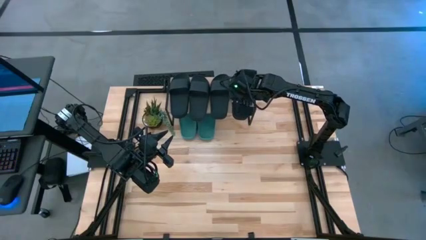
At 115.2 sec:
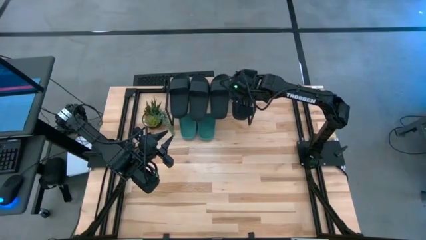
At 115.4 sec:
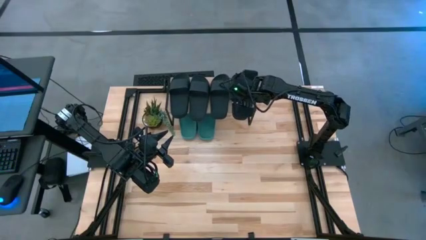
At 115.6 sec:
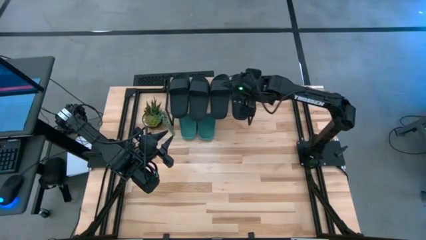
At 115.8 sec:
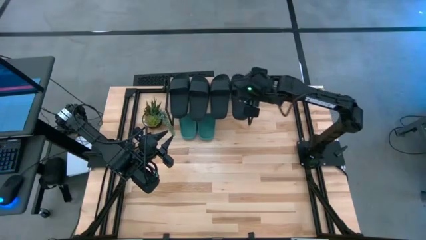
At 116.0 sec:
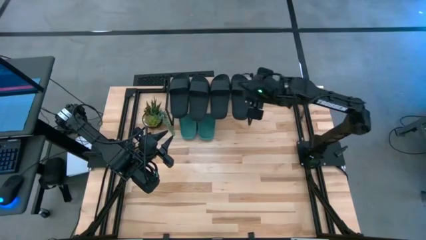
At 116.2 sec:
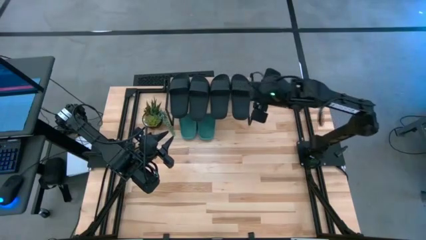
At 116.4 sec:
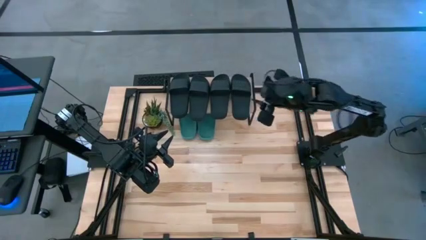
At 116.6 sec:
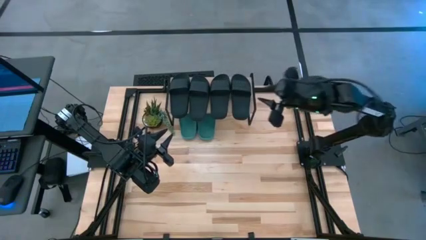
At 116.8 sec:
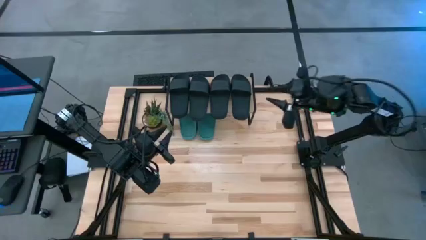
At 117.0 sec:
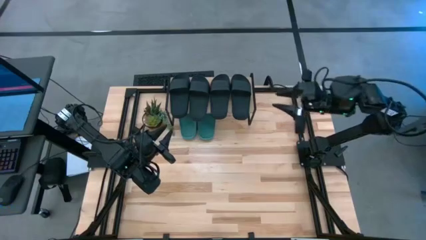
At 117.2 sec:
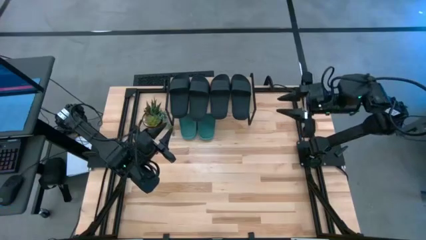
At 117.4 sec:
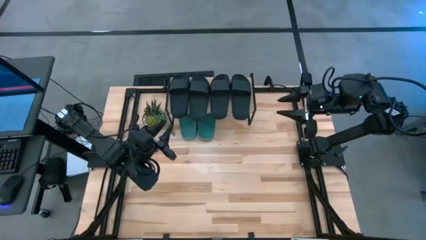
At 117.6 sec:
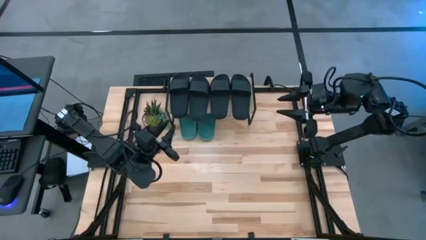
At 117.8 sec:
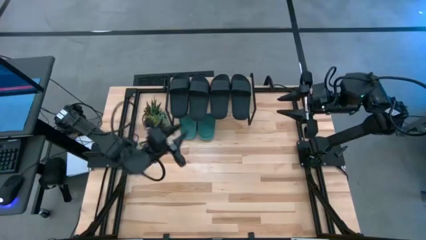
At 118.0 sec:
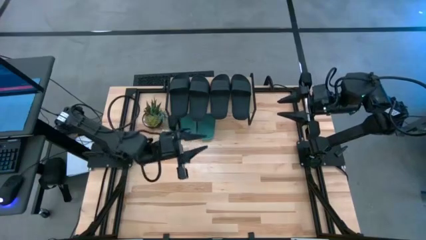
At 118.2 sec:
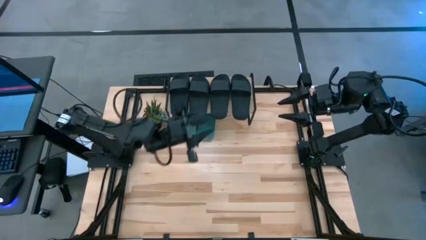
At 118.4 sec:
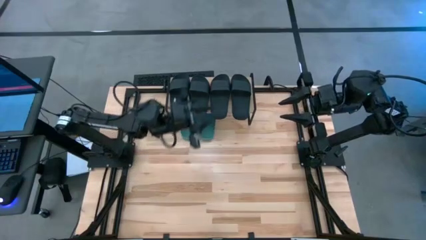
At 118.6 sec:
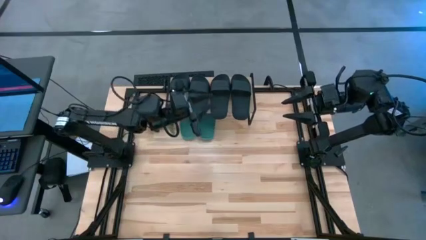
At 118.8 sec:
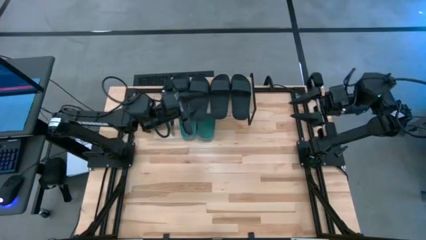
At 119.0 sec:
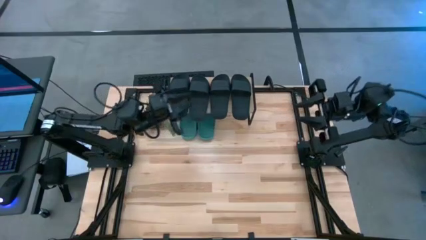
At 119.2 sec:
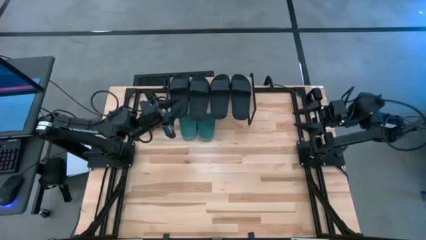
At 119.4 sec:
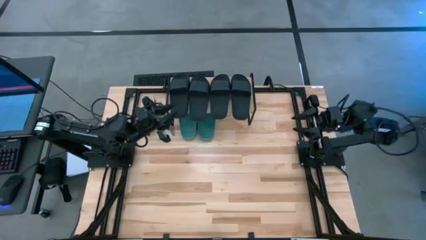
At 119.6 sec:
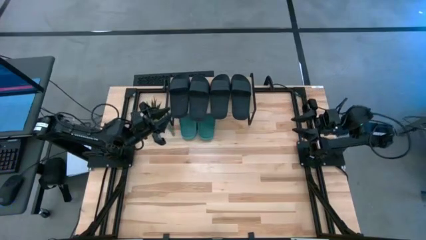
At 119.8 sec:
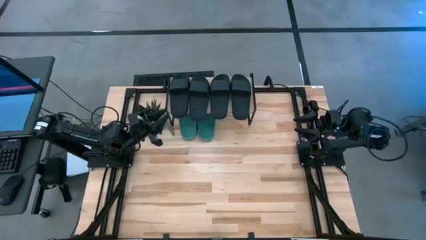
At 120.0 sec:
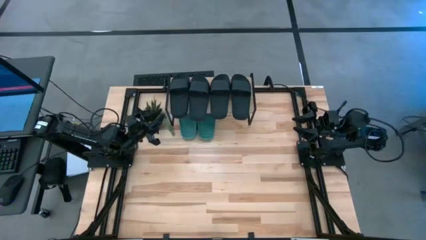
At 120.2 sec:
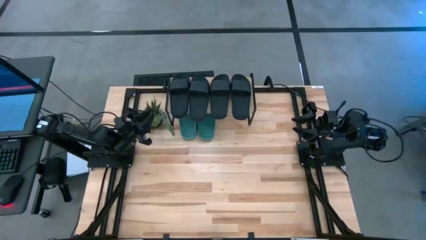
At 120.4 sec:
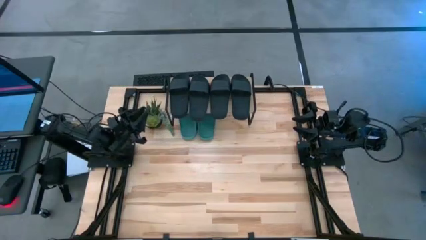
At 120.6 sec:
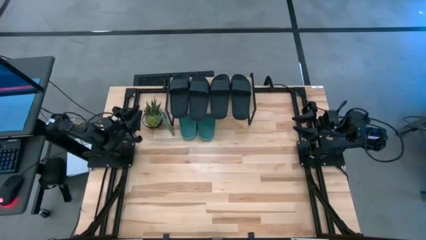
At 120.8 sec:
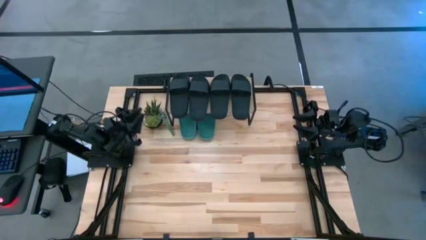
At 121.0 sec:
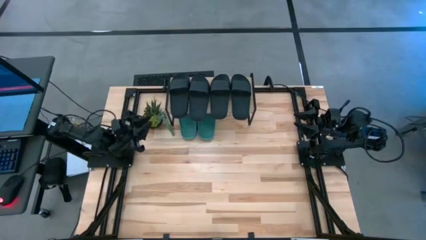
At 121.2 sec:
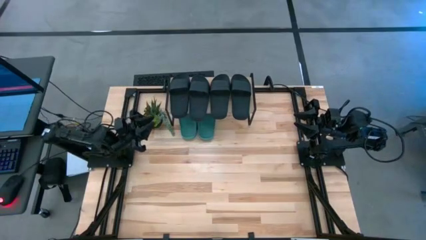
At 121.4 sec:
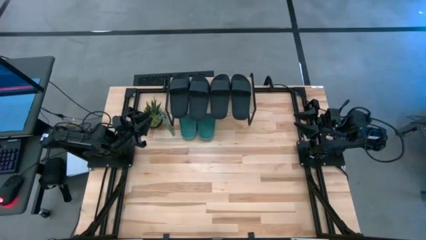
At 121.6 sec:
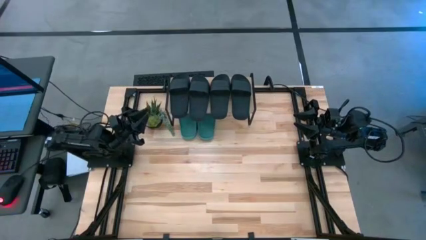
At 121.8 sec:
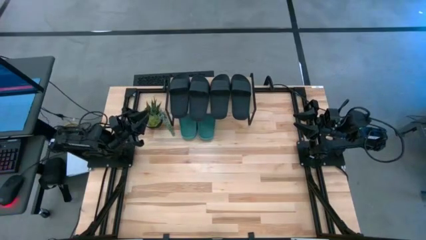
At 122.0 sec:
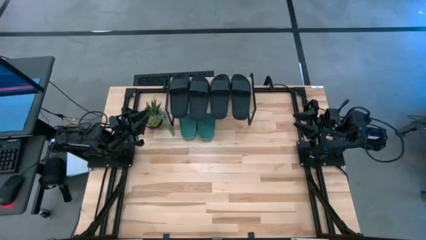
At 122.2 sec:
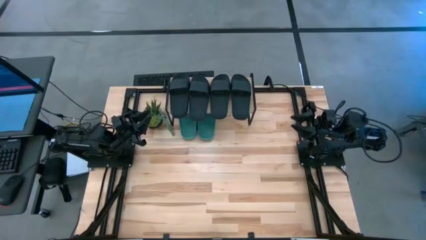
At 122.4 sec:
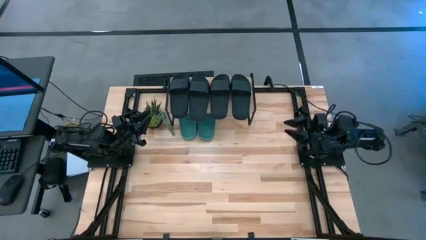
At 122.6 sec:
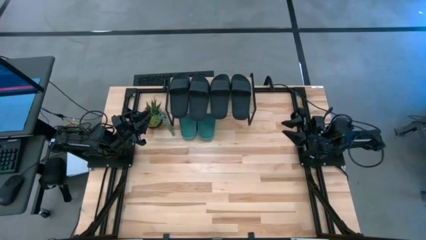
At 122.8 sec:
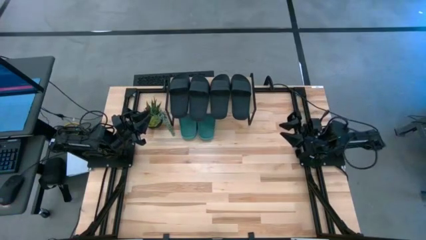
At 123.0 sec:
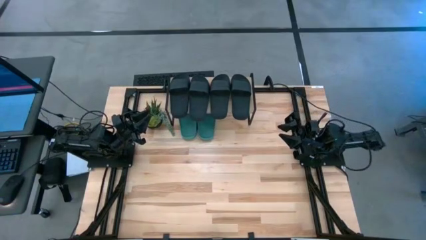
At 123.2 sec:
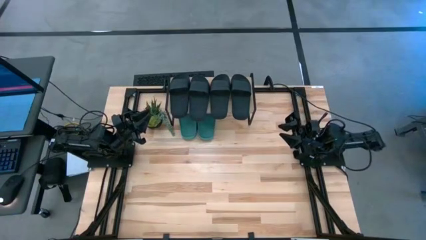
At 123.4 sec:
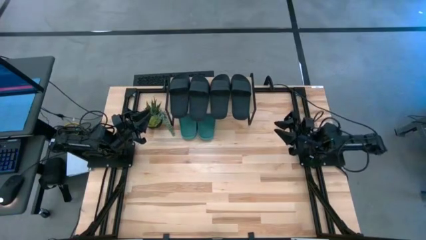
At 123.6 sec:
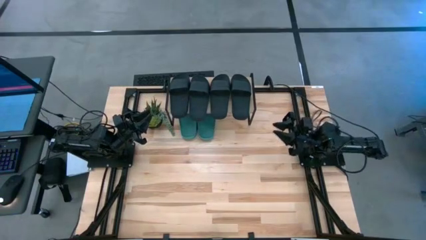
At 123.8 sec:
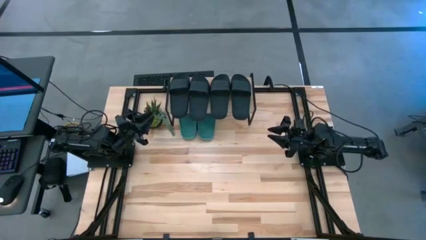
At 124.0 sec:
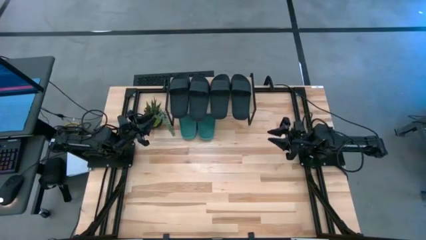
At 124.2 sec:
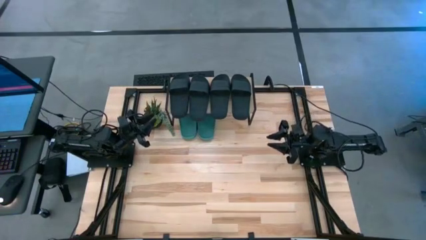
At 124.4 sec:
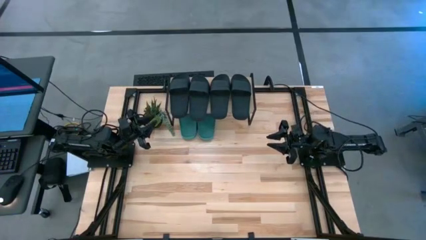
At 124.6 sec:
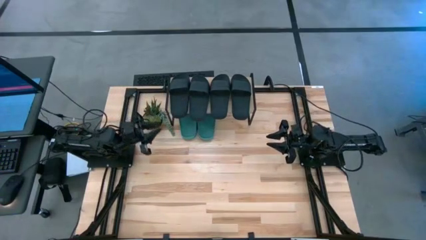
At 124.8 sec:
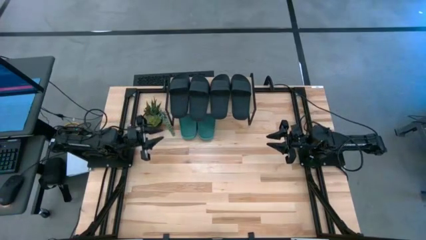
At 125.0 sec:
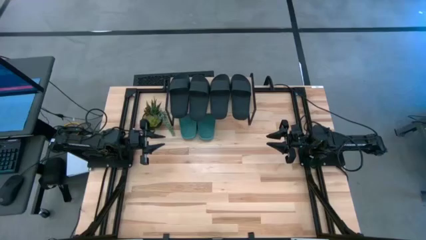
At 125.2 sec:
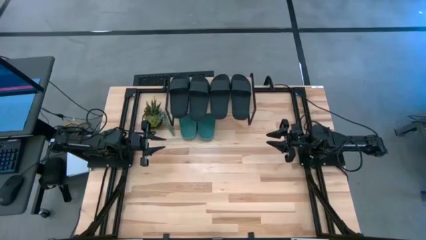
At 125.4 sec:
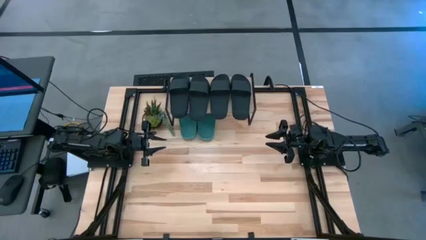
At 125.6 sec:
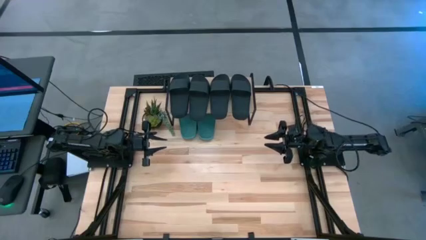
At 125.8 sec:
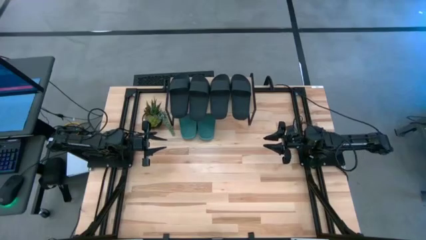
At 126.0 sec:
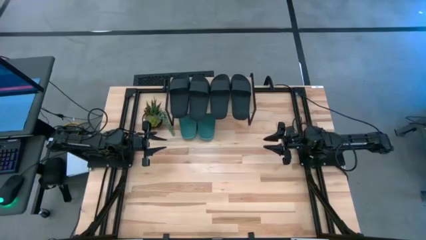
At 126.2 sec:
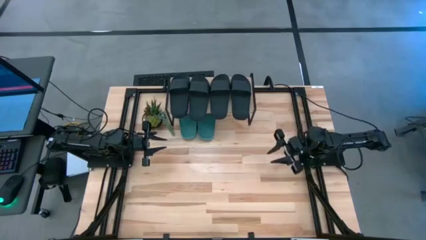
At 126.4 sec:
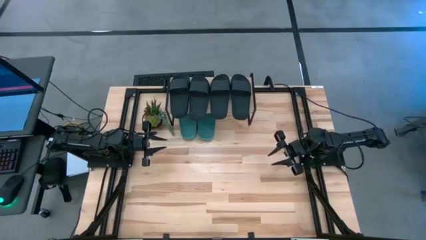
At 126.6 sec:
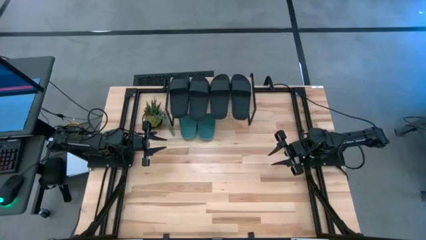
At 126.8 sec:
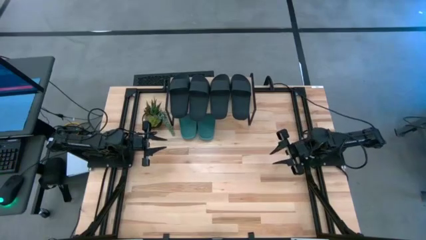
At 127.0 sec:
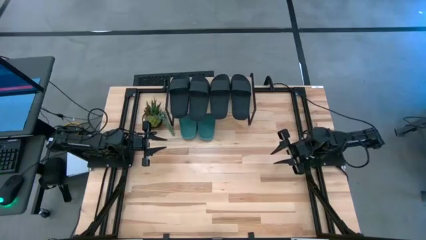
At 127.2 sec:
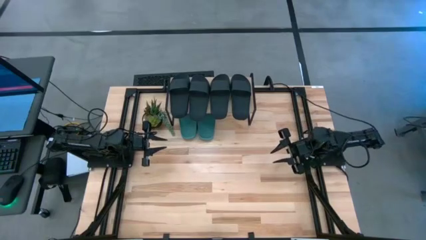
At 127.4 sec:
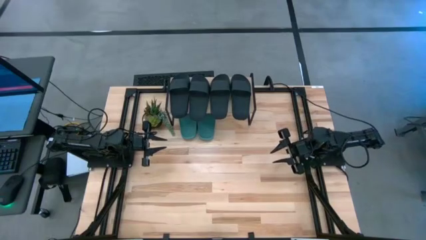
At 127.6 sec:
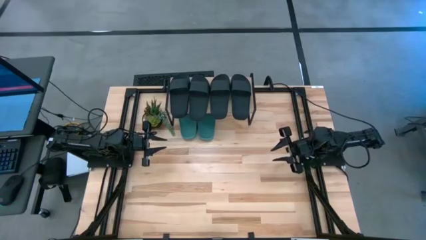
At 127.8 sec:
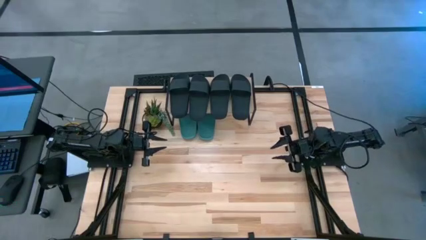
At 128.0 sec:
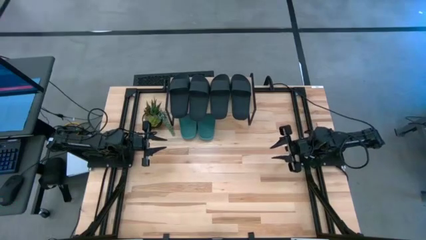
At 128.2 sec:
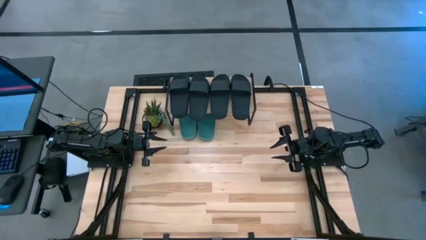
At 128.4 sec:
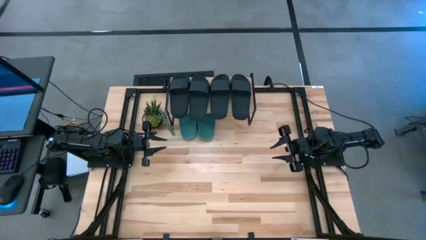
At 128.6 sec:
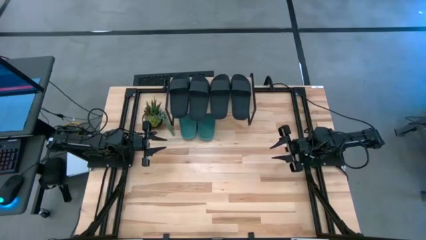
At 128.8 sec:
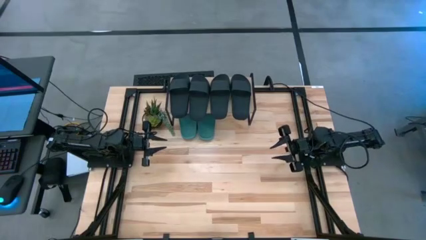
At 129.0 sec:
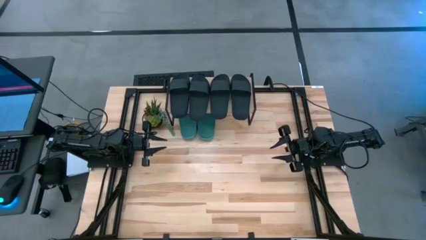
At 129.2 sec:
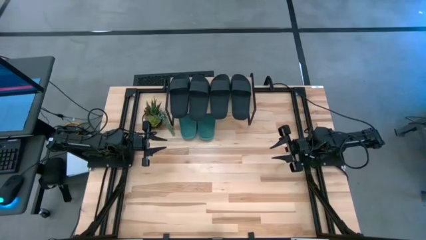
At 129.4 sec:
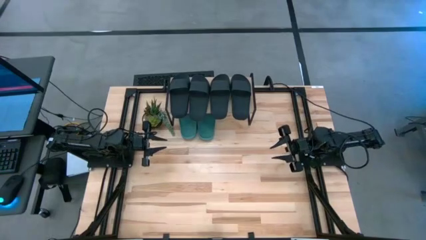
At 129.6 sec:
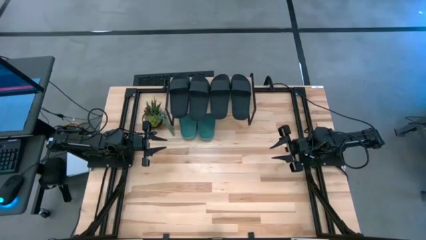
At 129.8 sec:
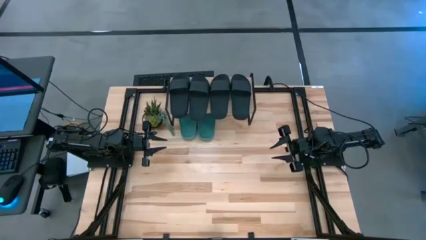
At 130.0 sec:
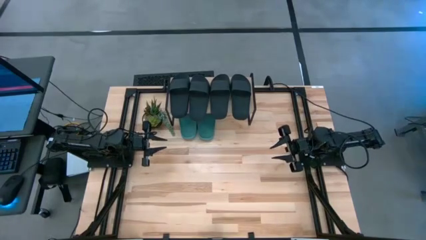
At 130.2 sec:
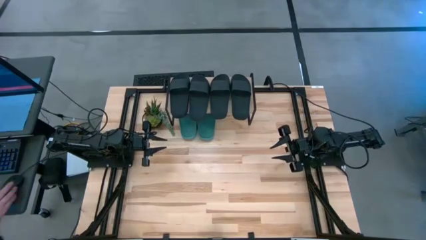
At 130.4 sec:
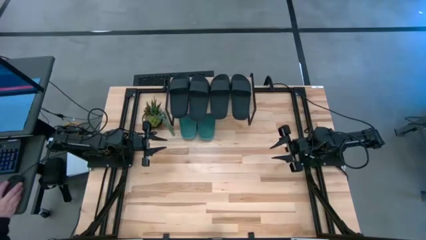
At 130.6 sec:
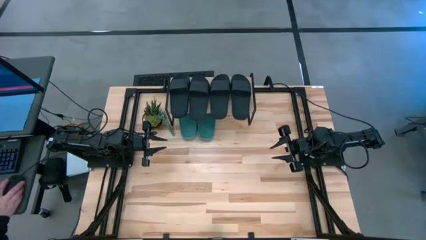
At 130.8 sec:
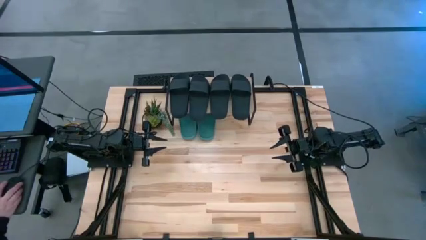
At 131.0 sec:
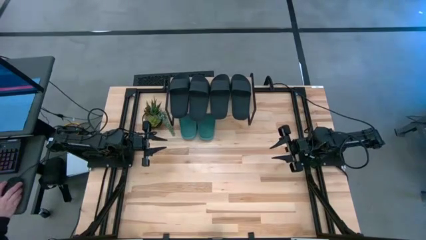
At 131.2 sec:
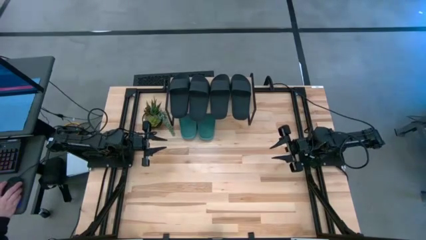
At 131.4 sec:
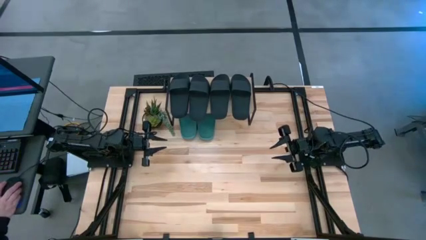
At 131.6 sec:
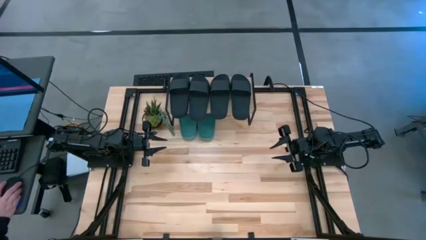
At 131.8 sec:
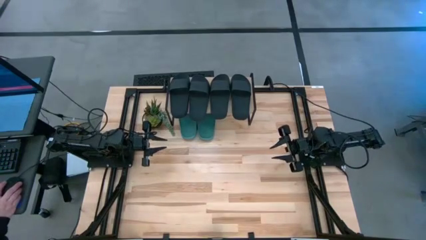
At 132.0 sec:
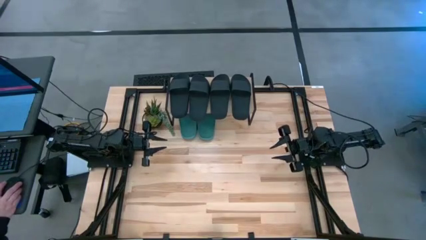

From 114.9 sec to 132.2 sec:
Task: Pick and place slides into the shelf
Return to Home Position
